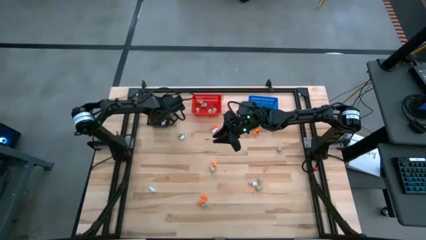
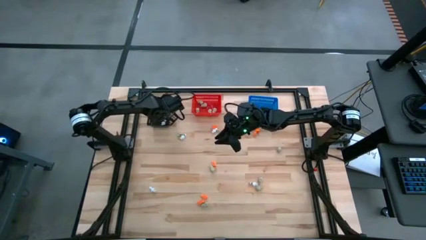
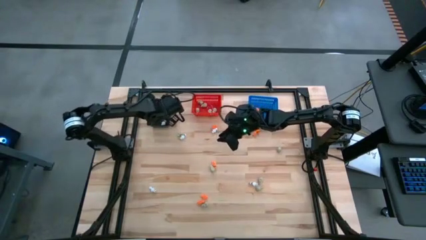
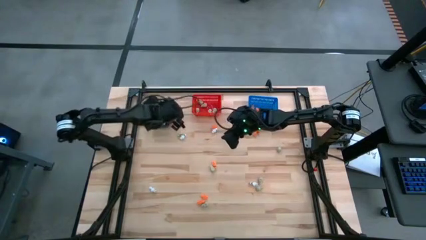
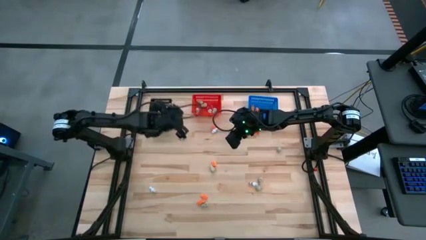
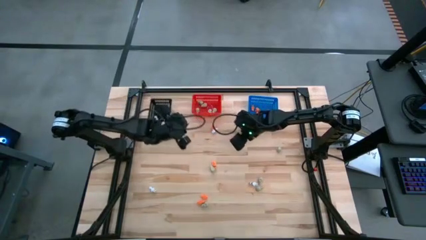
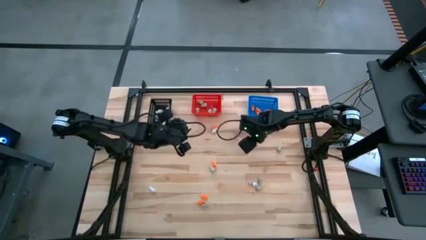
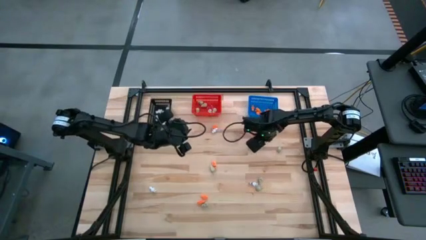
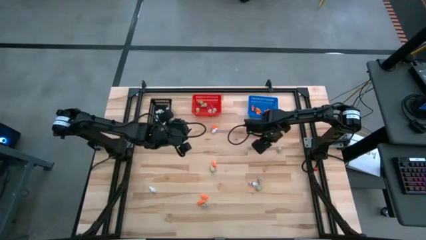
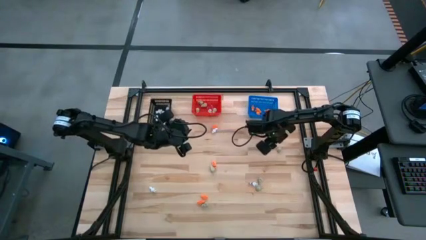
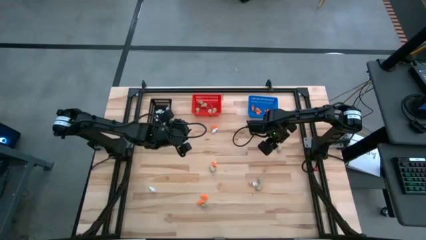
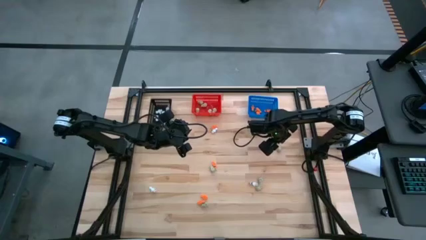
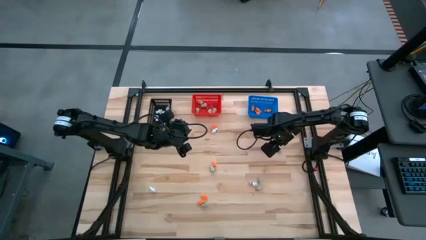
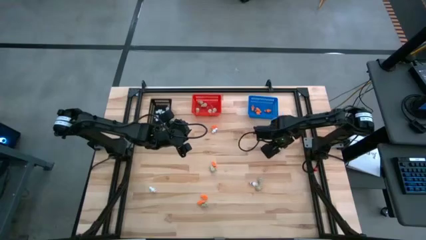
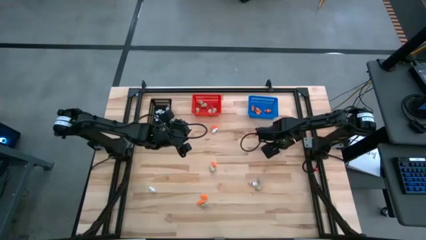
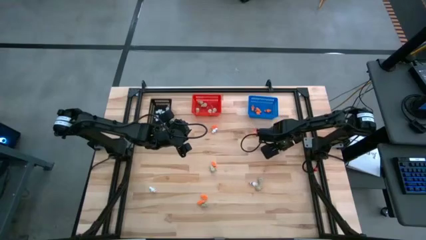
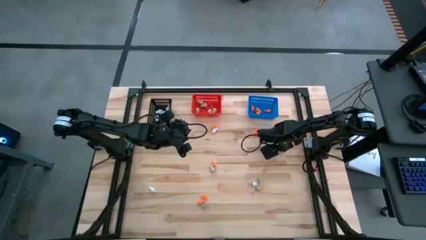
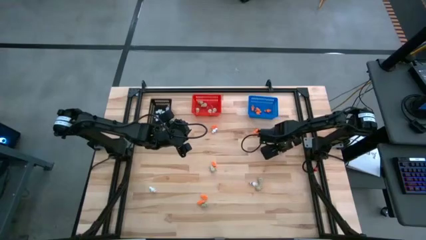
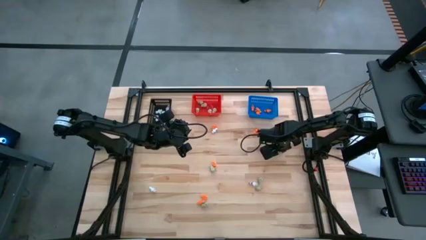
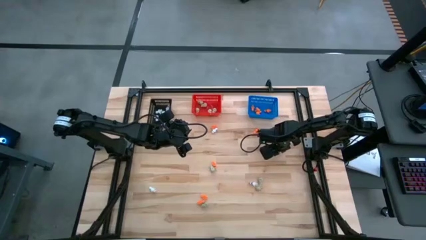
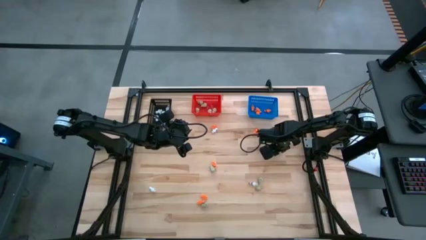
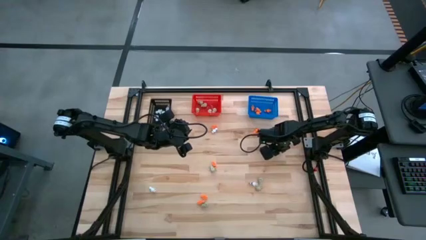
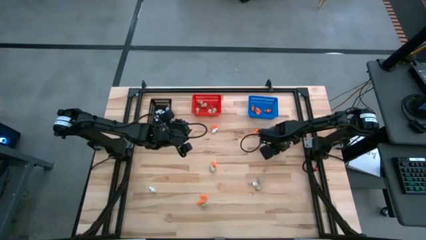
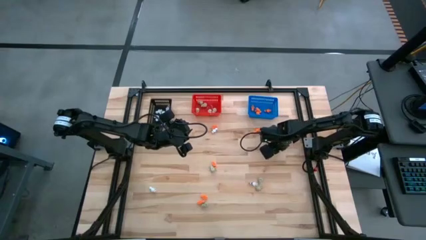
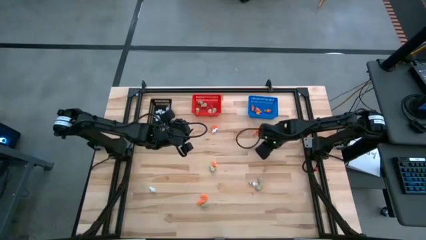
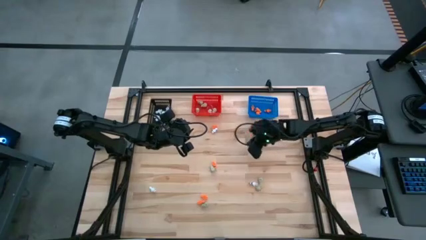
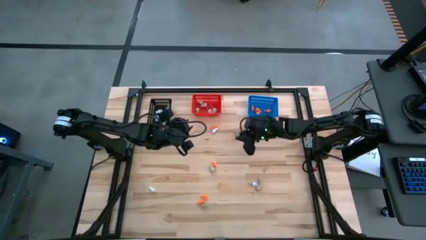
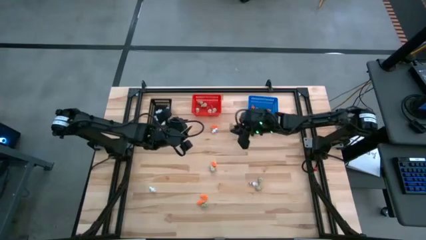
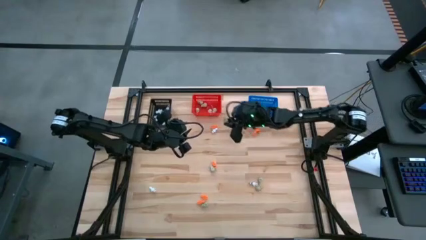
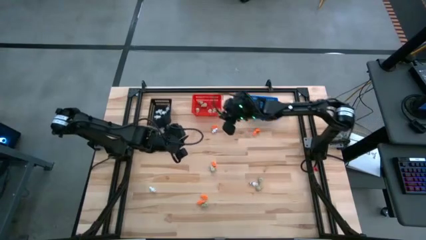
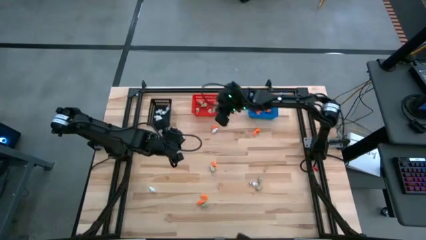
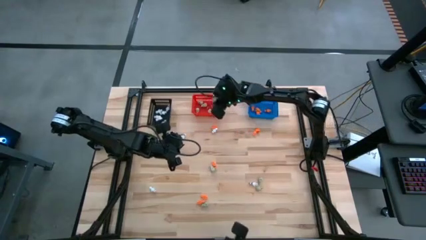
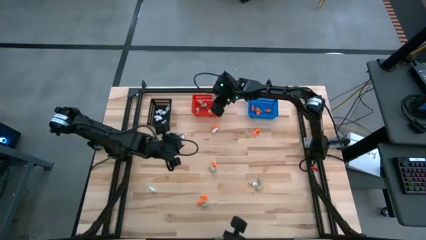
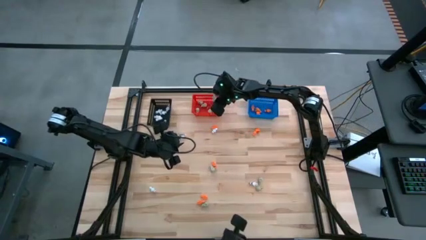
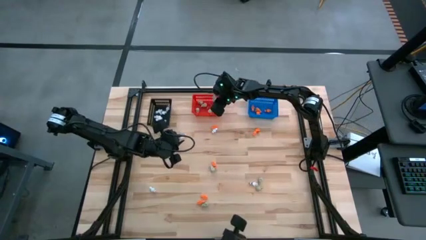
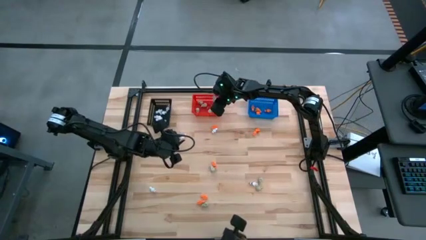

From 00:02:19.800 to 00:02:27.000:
Task: Sort Halloween decoration
Put the white skull toy into the red bin

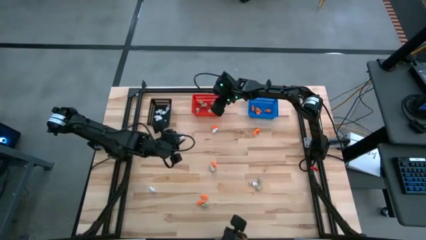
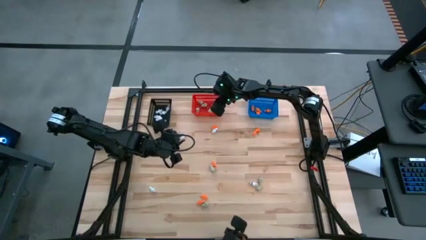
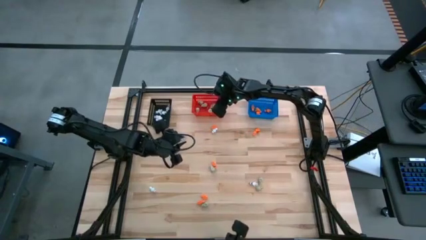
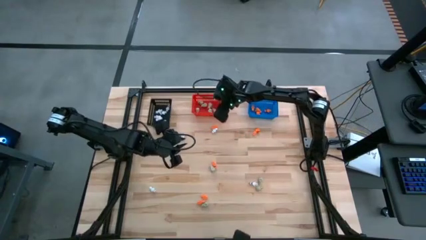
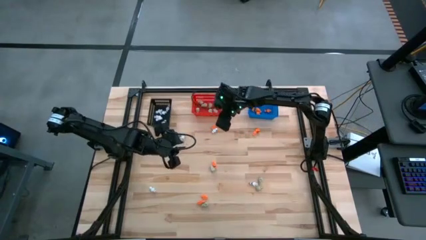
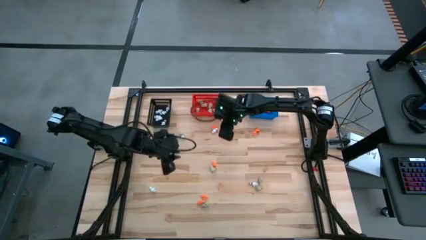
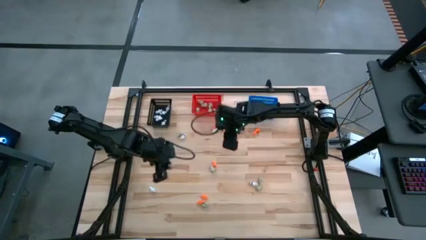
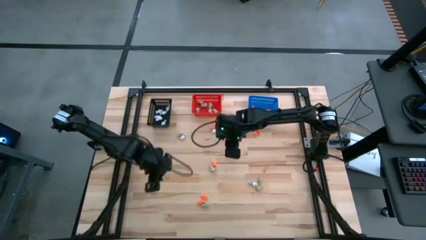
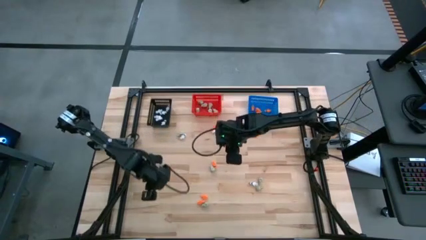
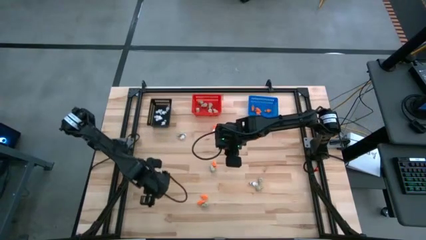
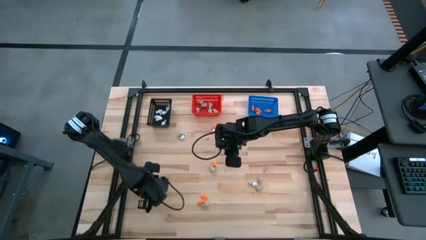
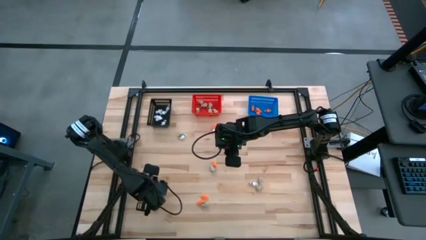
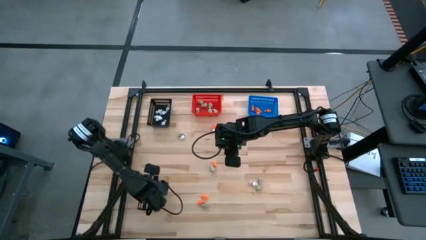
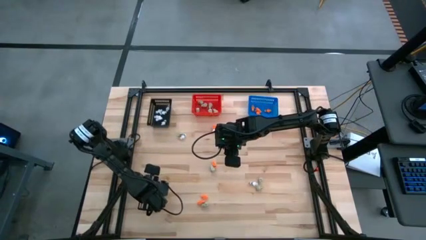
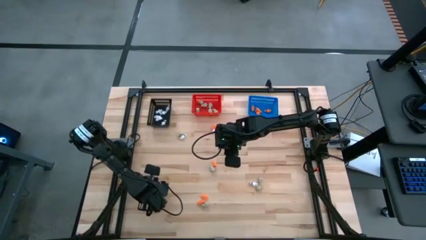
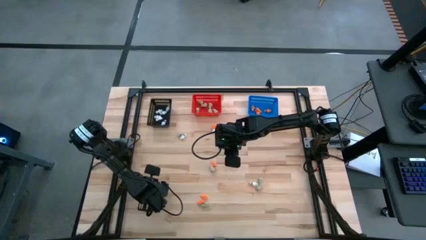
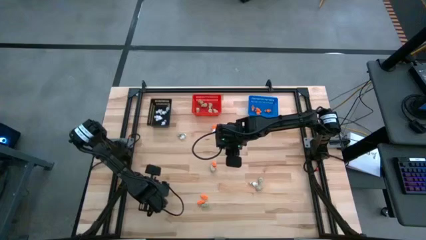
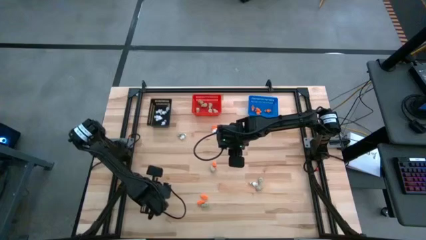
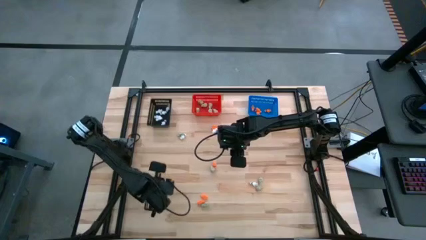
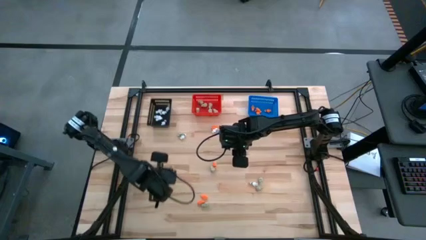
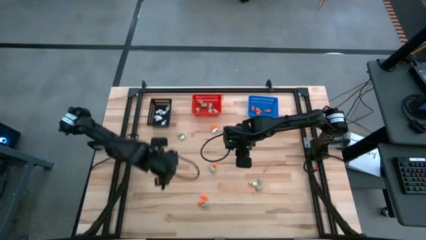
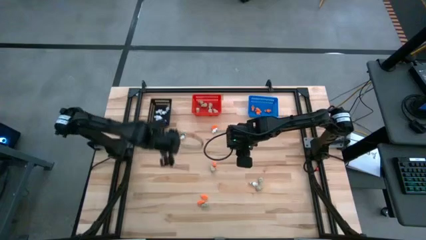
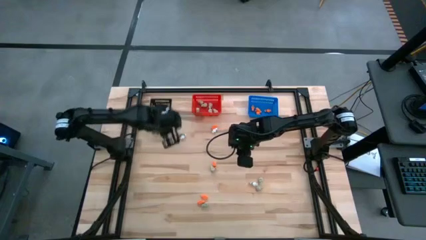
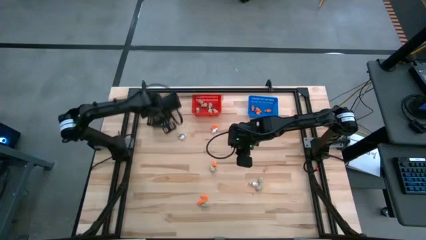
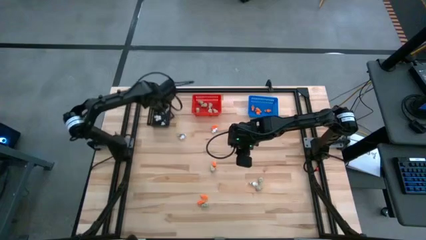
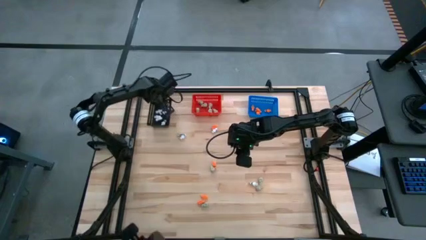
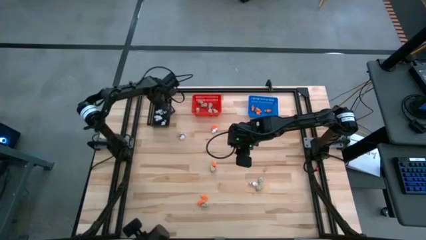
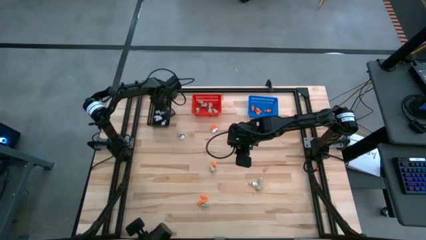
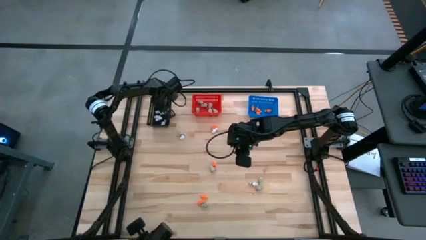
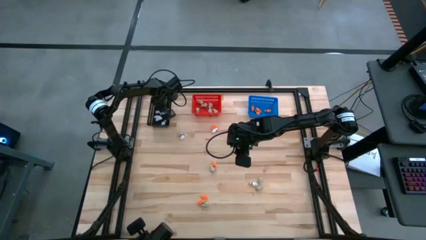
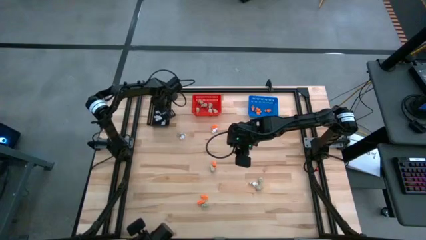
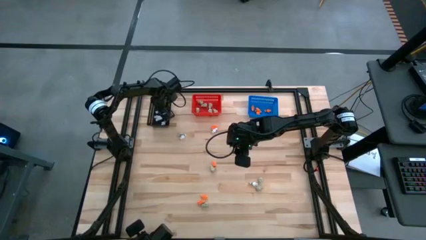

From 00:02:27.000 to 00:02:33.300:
Put the white skeleton toy into the black bin
